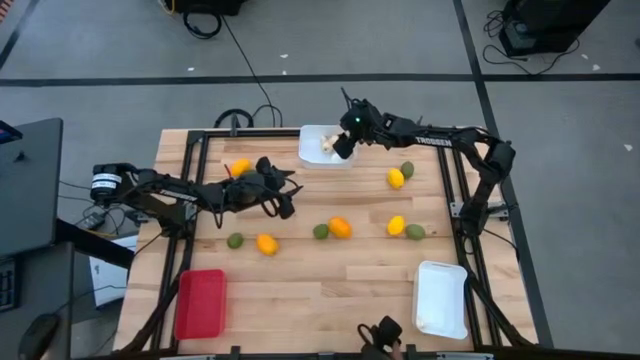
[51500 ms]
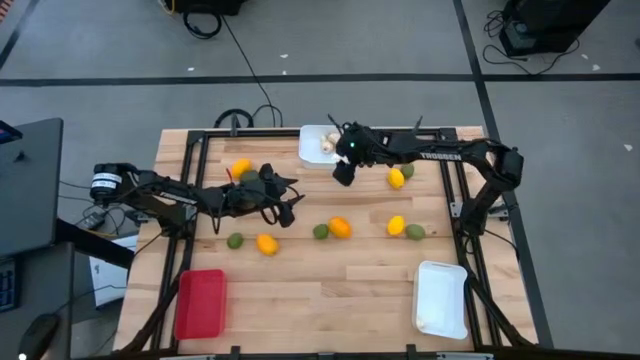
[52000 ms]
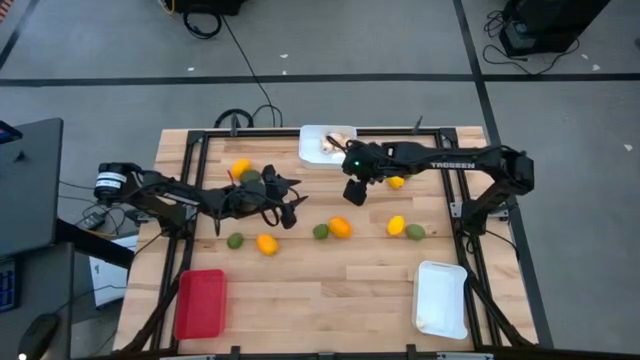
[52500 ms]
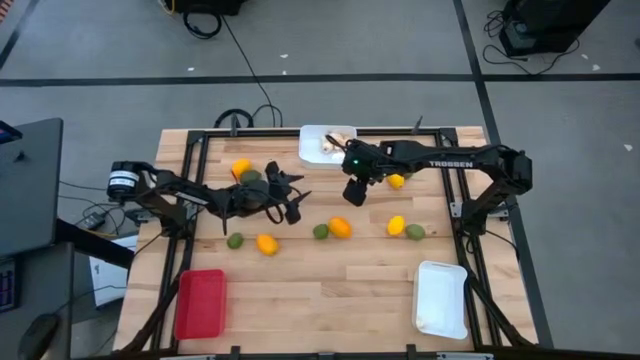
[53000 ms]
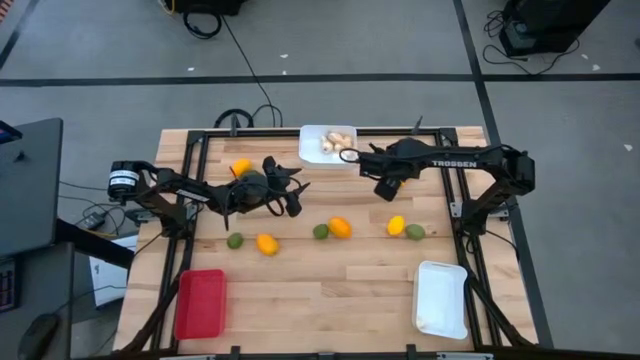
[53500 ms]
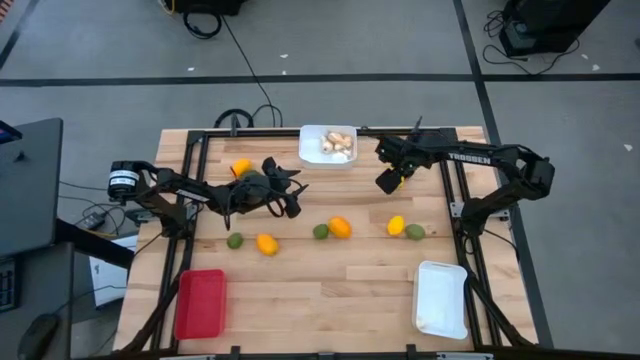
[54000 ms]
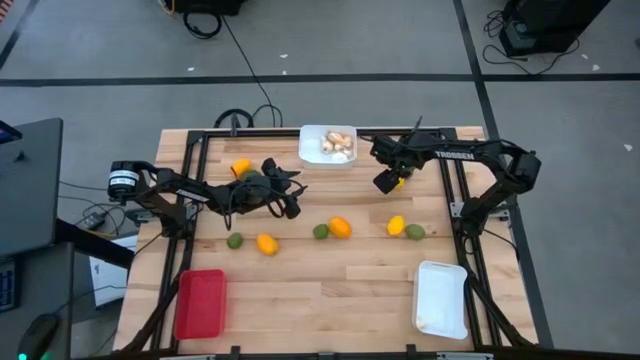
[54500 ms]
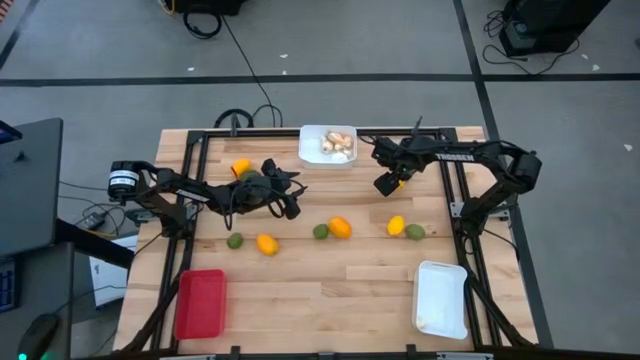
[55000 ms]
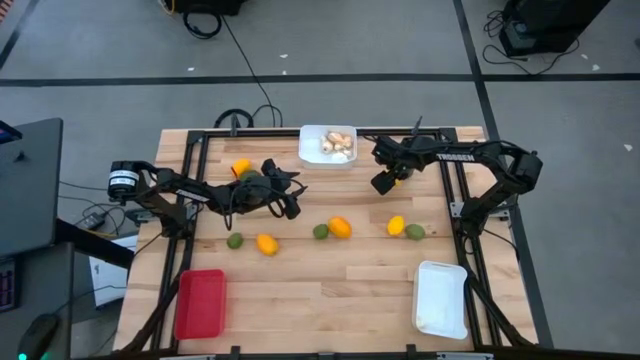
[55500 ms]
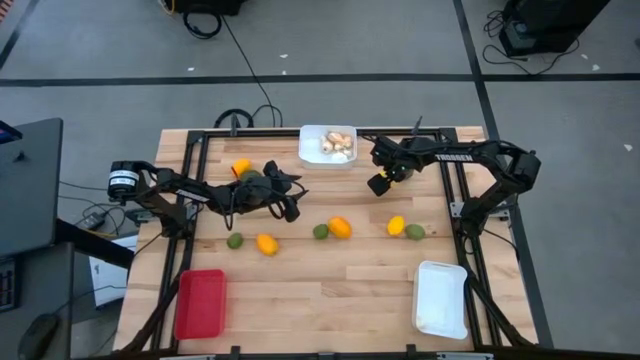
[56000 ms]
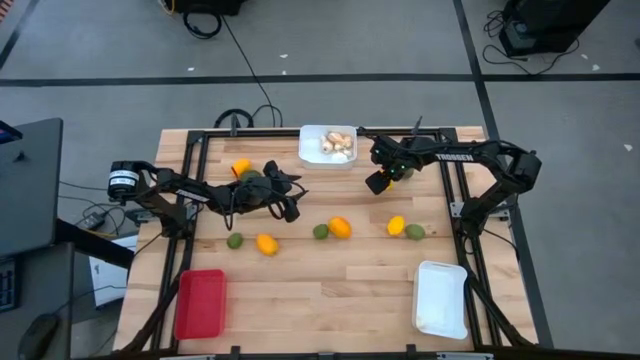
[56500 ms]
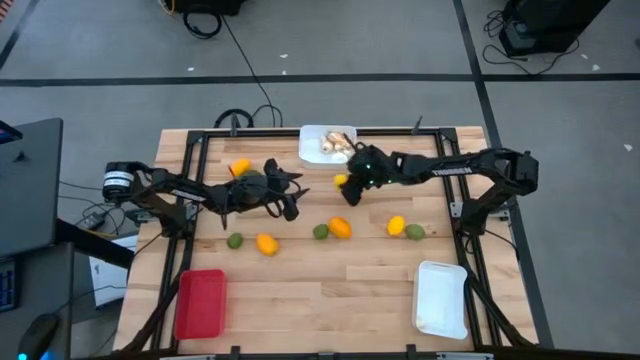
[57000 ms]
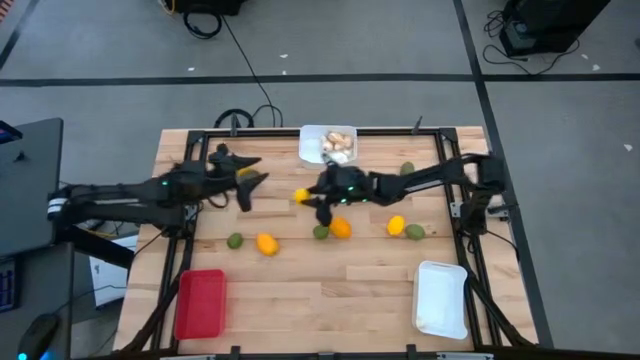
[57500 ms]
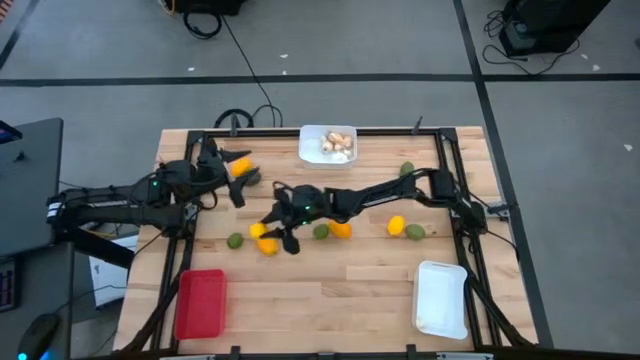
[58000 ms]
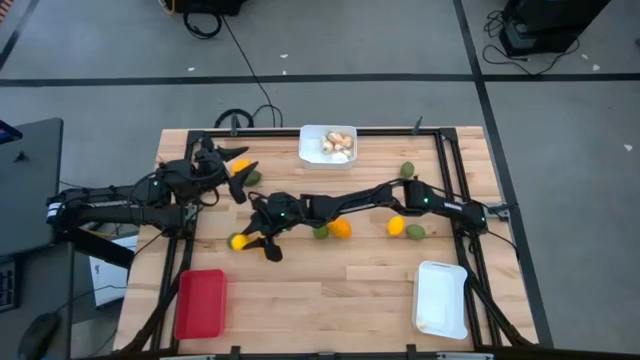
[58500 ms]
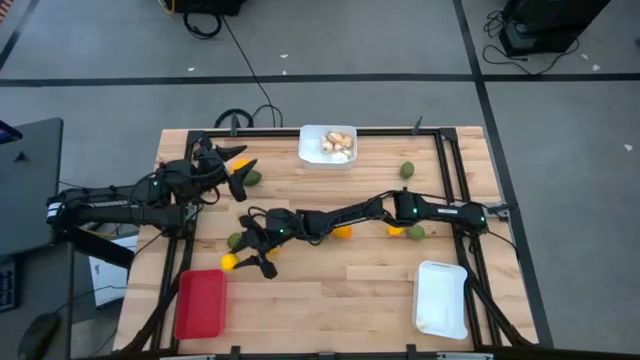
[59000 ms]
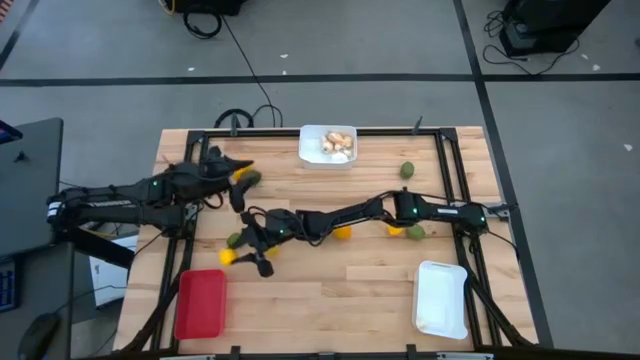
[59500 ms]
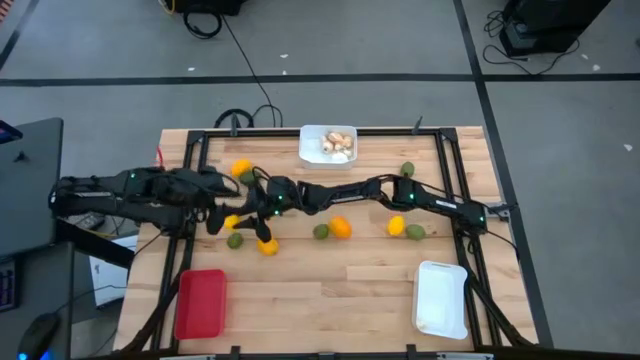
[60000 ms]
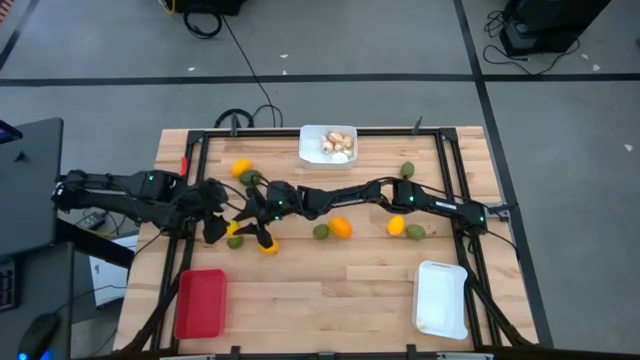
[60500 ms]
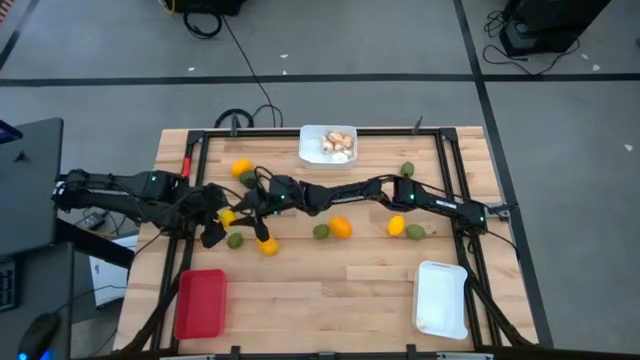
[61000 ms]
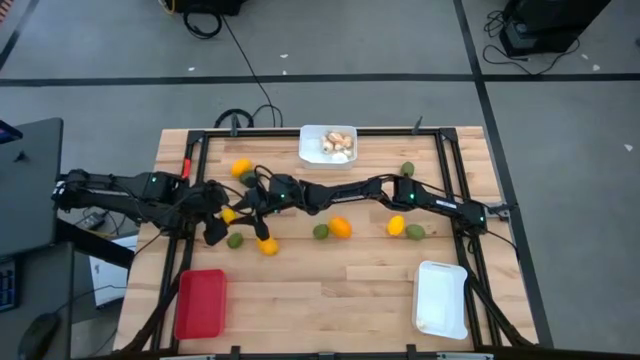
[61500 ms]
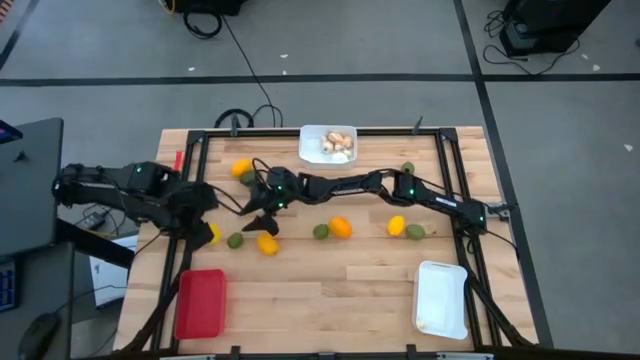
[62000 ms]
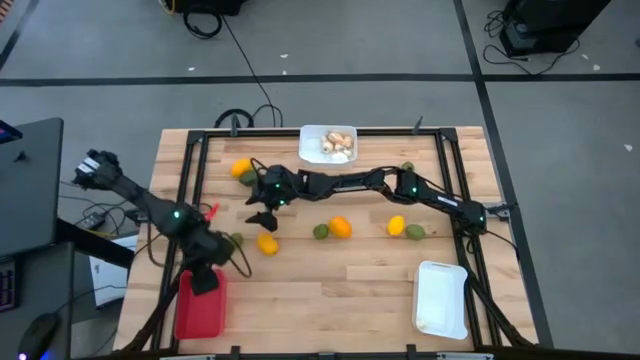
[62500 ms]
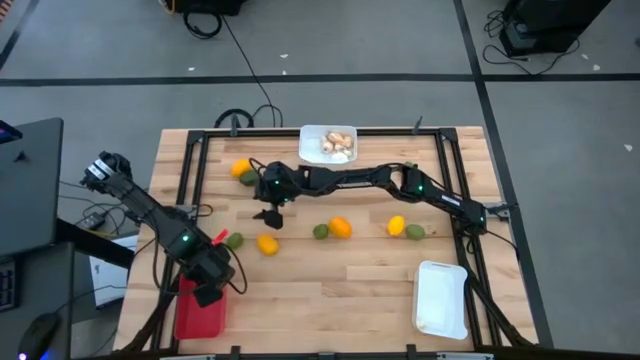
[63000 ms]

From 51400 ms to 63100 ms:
Task: Sort produce into baskets
Put the lemon into the red bin

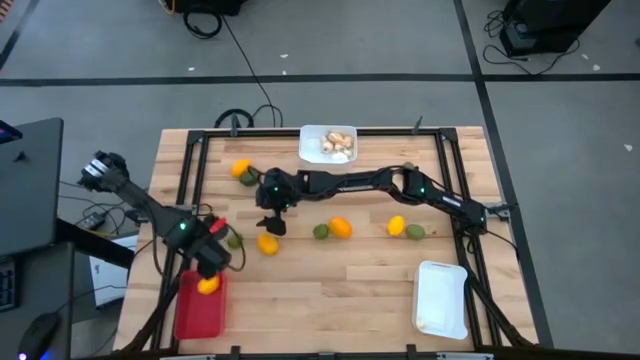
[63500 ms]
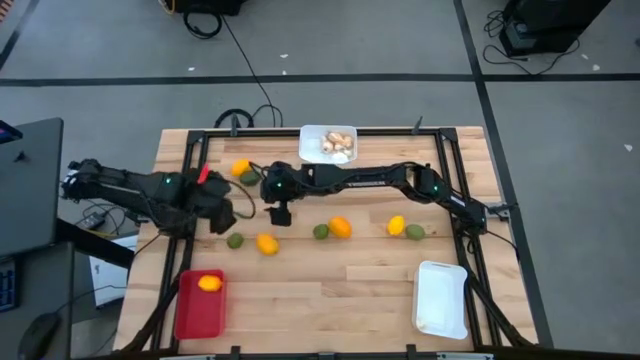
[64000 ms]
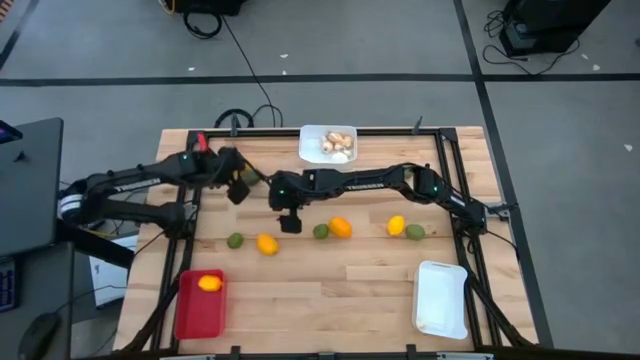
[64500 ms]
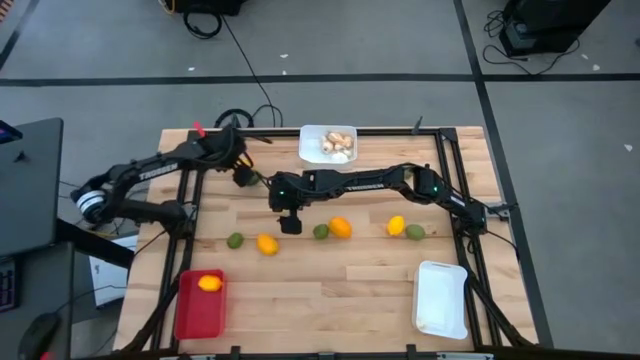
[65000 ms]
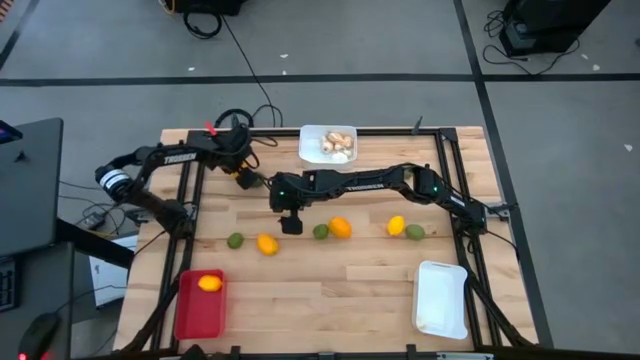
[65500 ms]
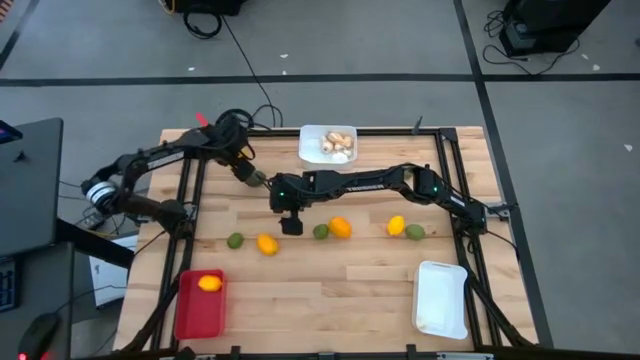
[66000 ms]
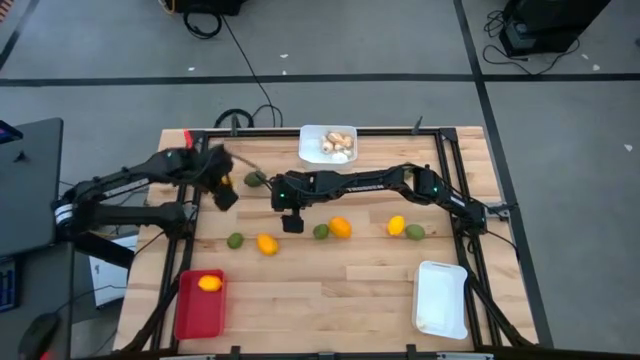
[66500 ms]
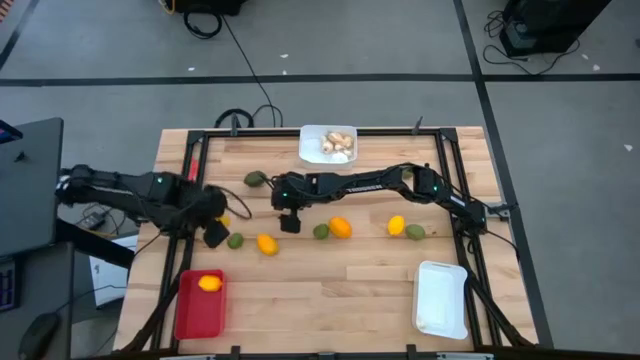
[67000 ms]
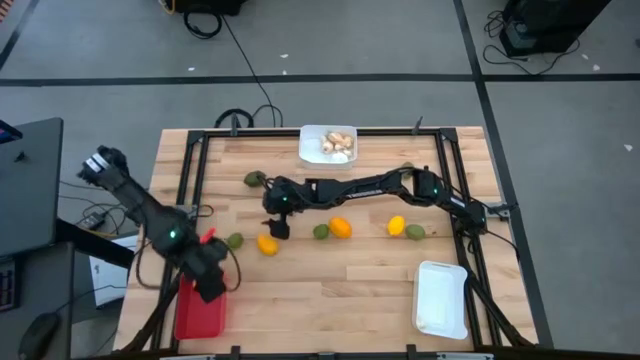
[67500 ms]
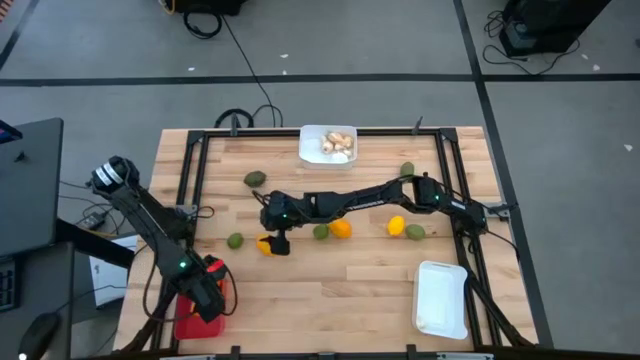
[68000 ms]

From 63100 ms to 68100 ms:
Put the lemon into the red bin

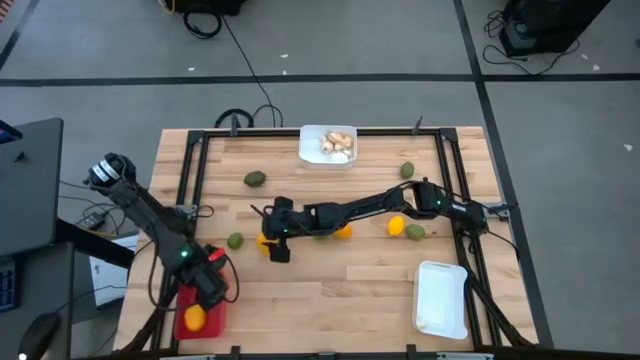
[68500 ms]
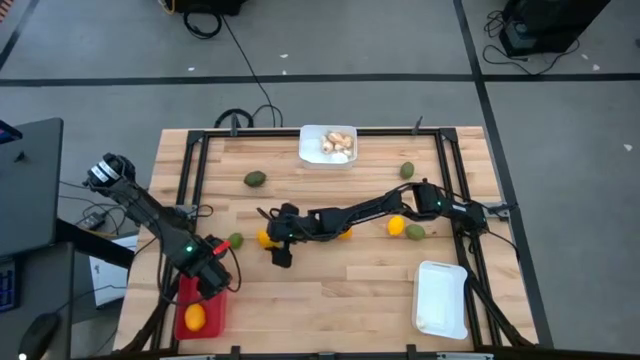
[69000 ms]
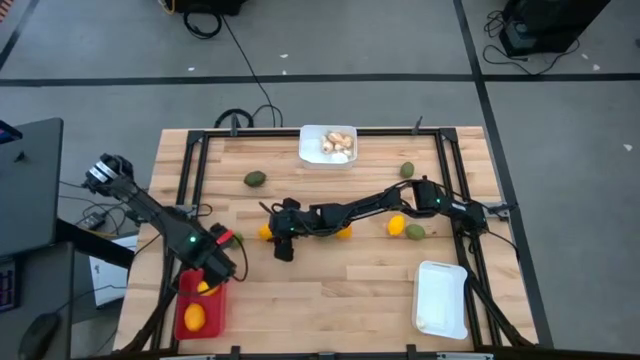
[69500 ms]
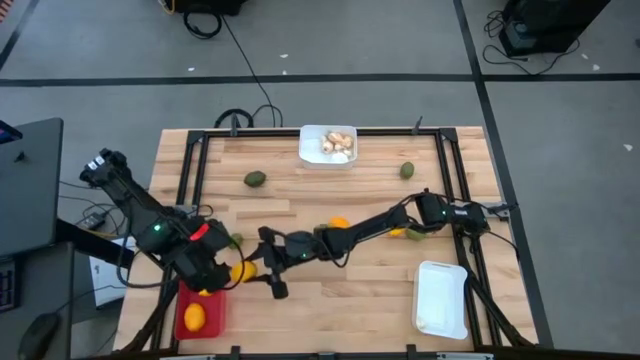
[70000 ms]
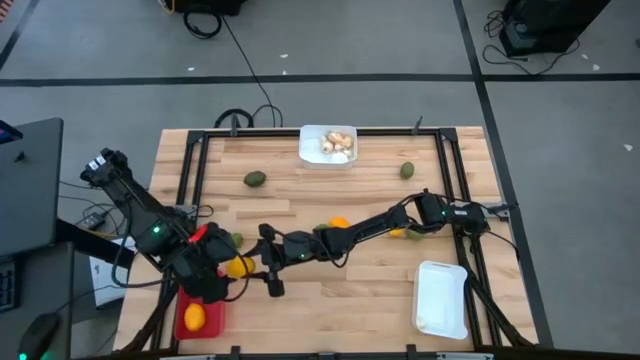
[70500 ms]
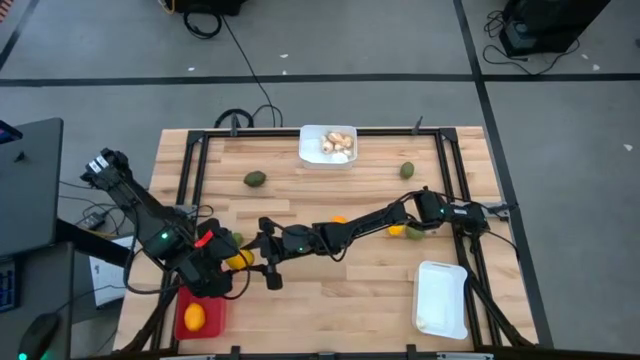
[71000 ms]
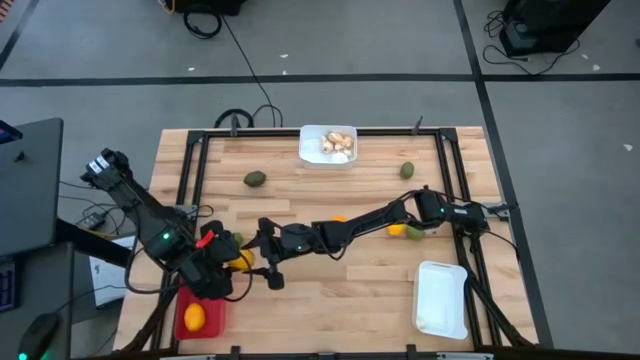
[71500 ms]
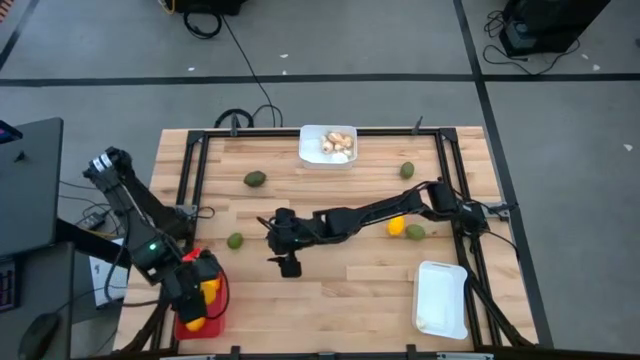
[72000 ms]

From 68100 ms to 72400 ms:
Put the lemon into the red bin

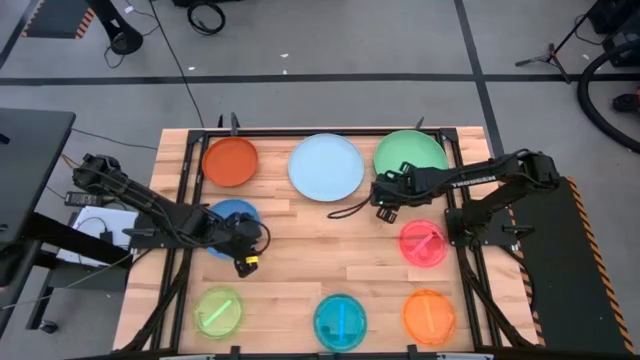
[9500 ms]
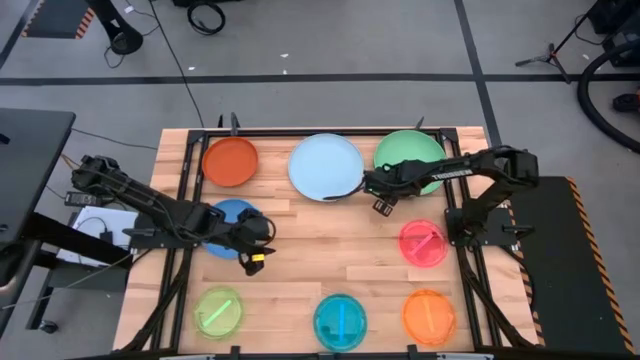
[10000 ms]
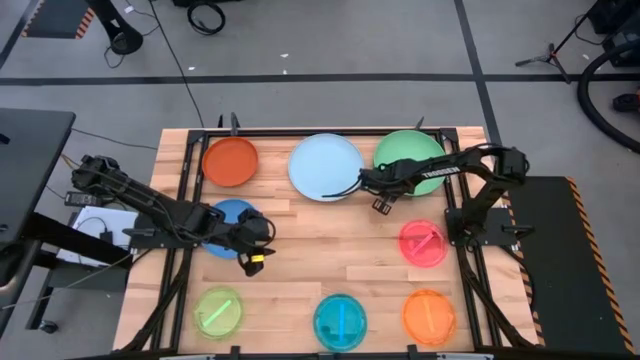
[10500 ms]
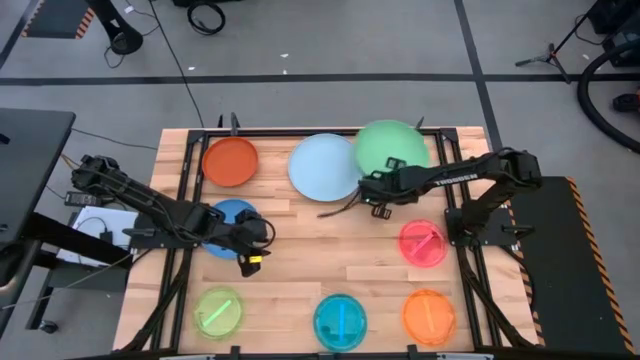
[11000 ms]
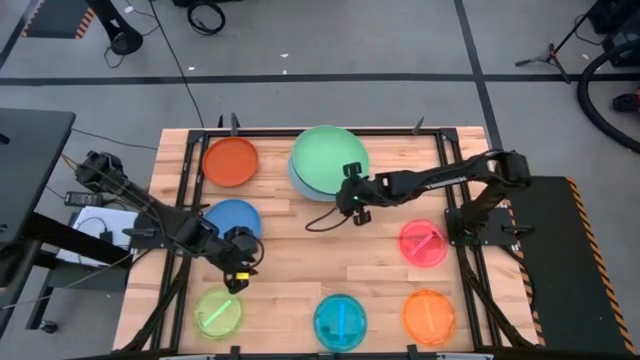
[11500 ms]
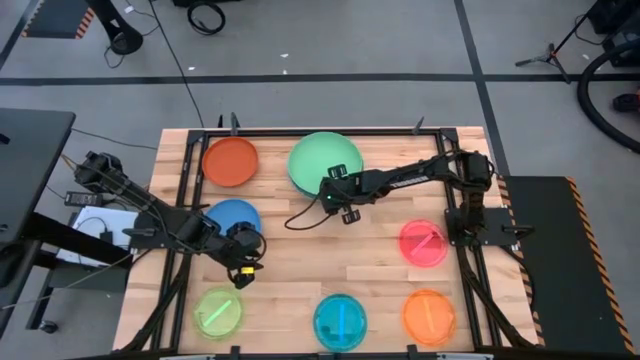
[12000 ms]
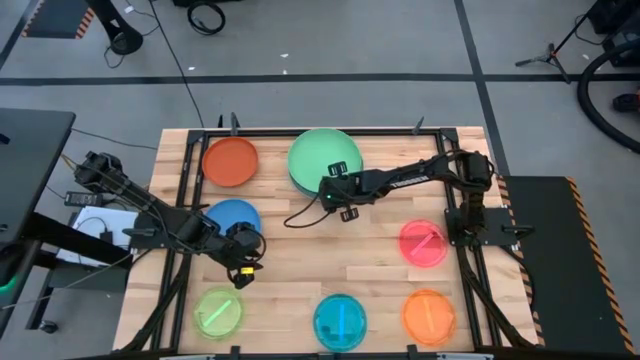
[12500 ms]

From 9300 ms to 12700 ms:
Task: Stack plastic plates
Stack the stacked plates on top of the light blue plate
